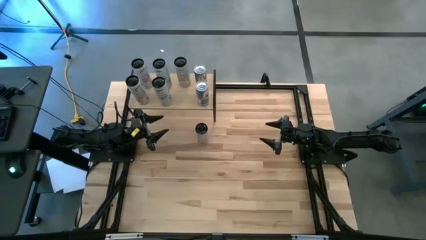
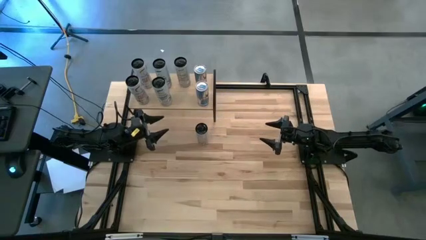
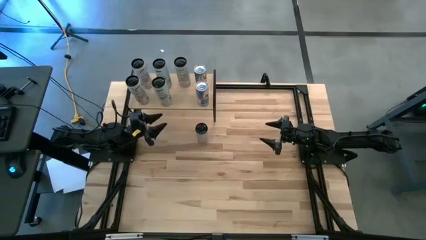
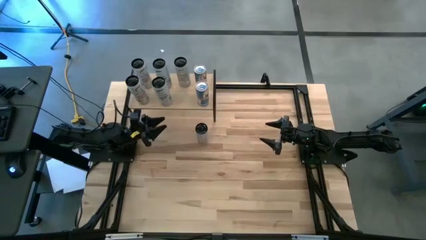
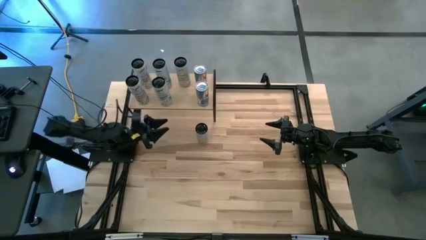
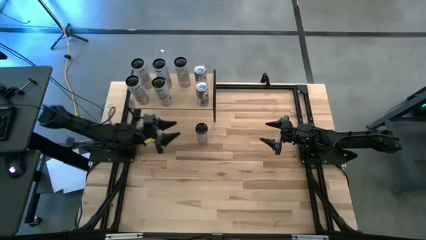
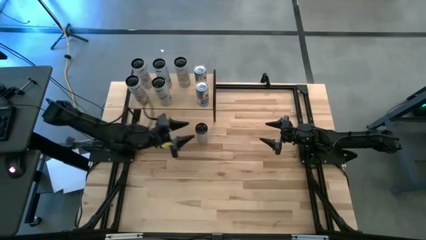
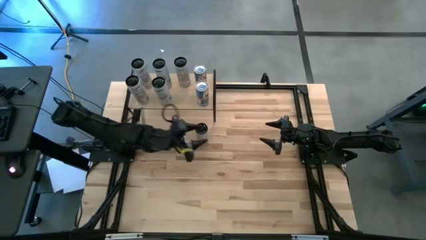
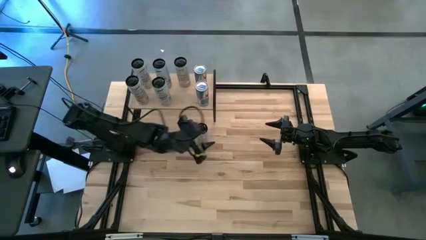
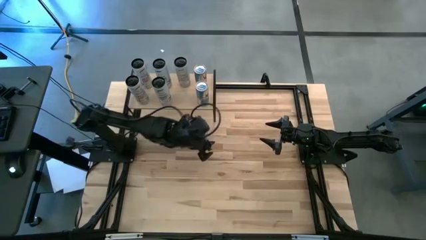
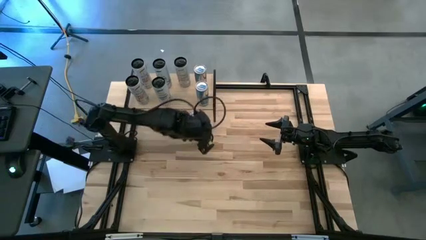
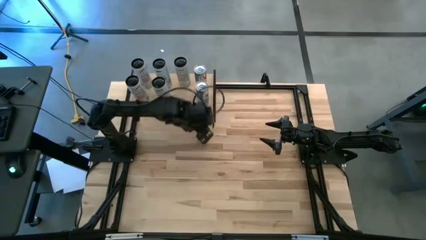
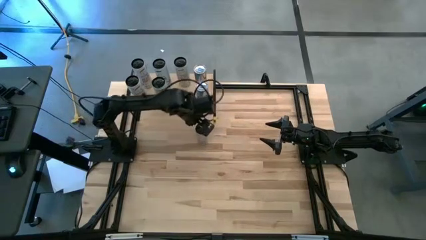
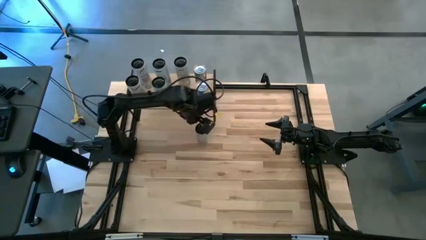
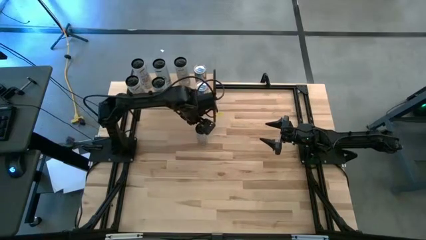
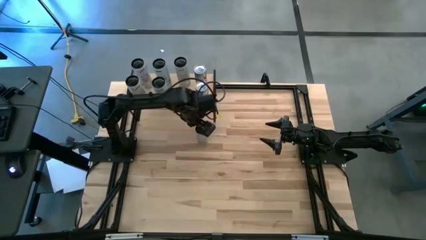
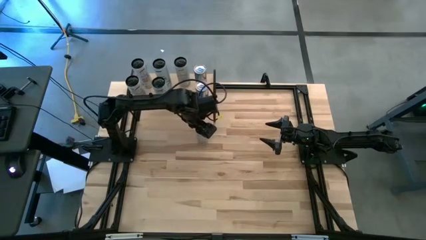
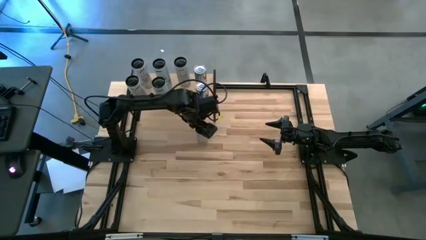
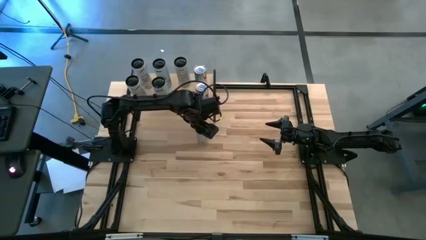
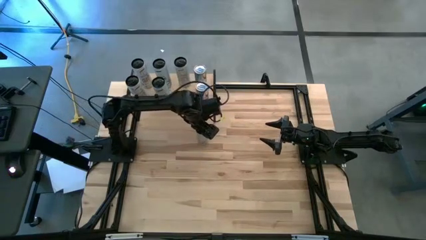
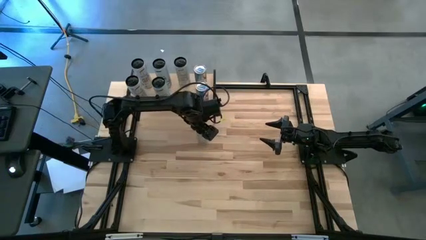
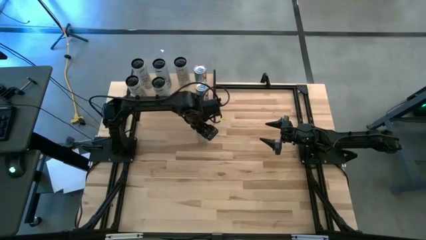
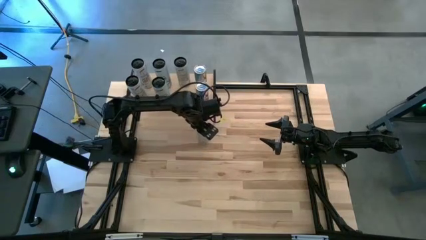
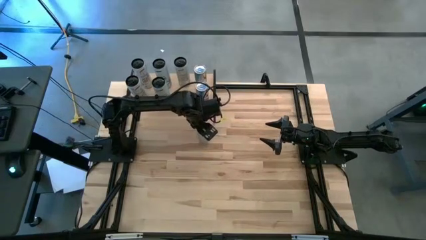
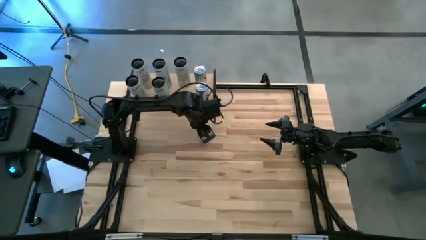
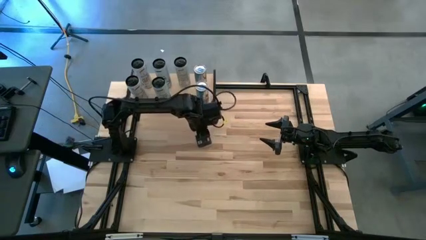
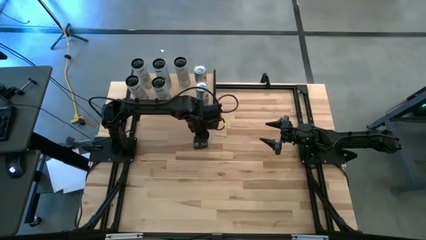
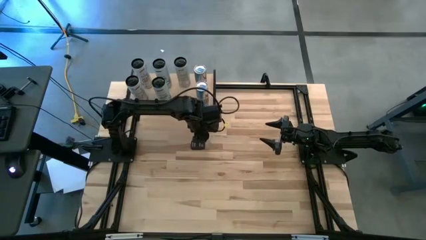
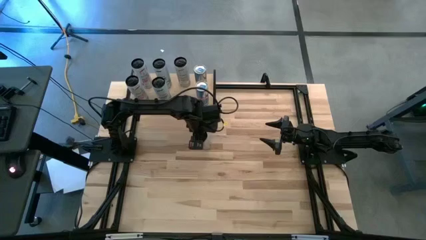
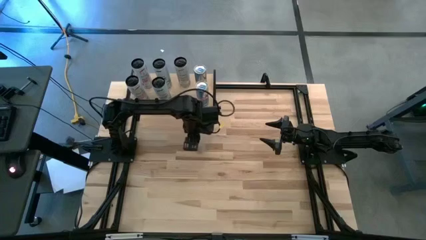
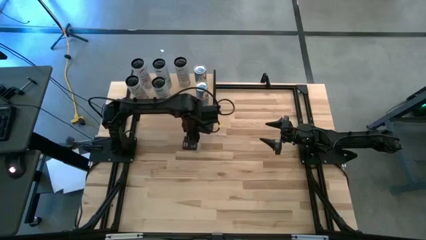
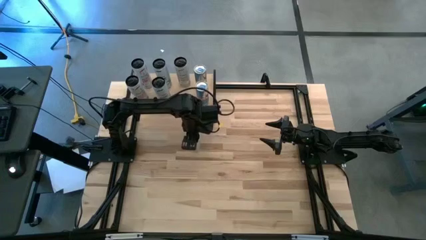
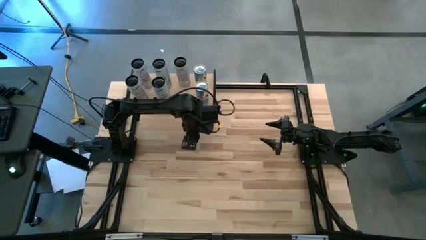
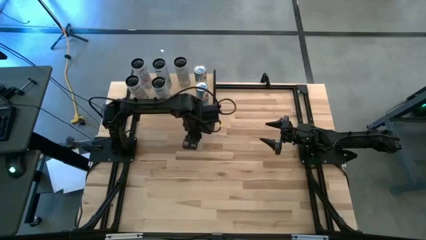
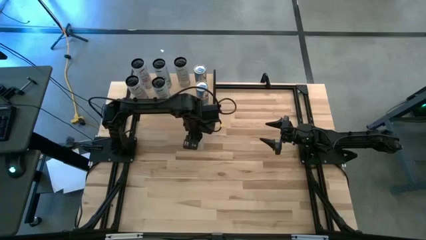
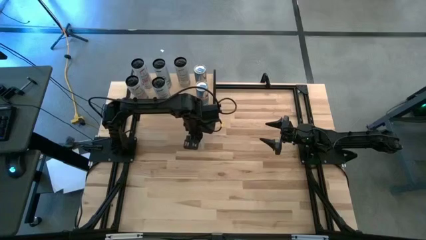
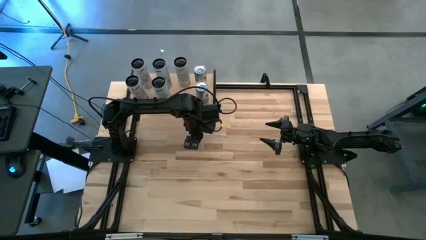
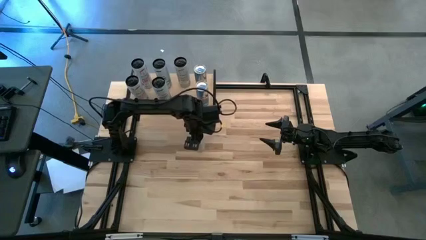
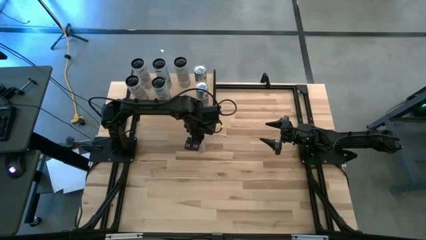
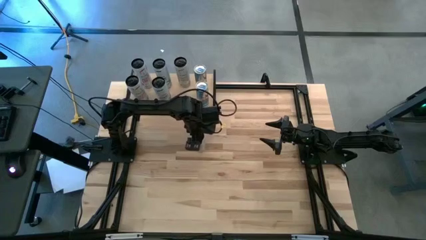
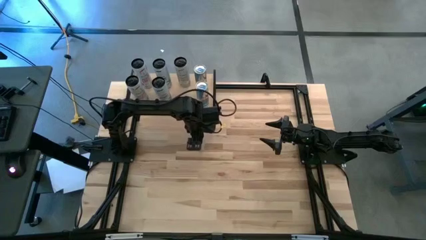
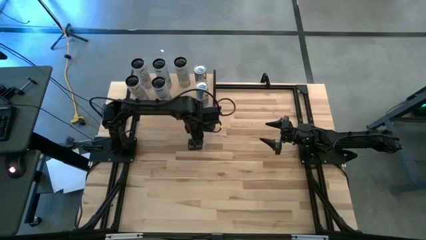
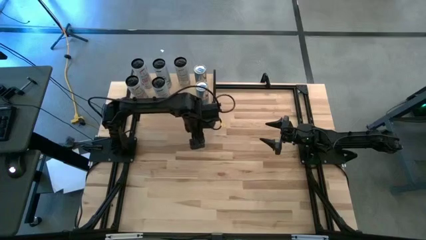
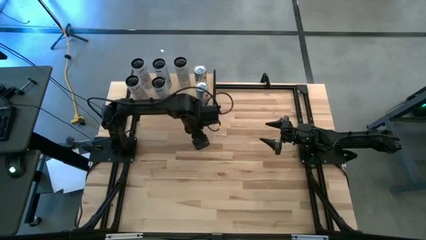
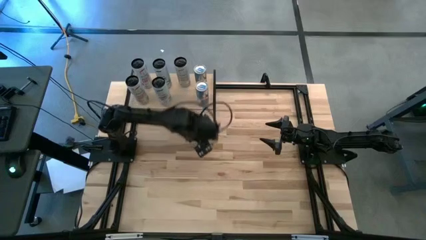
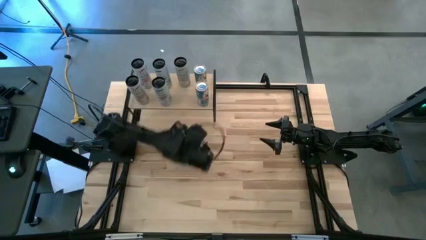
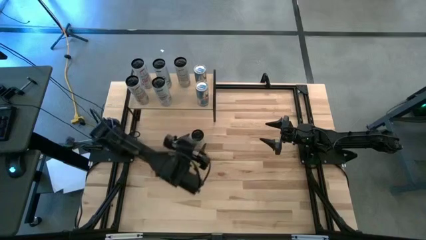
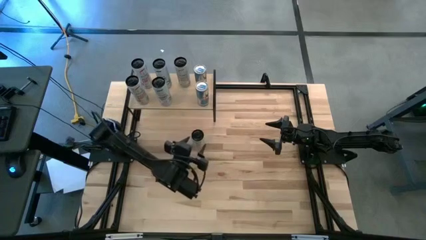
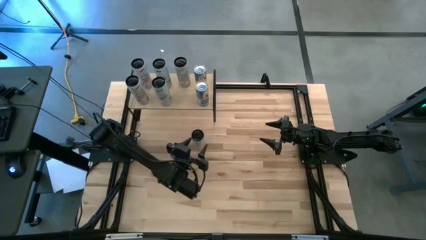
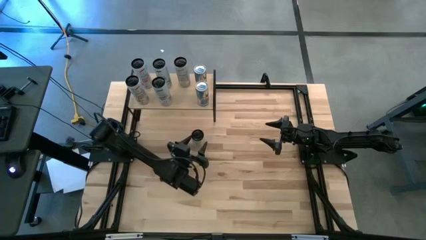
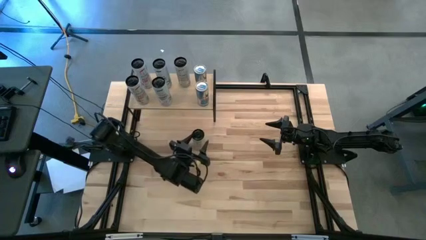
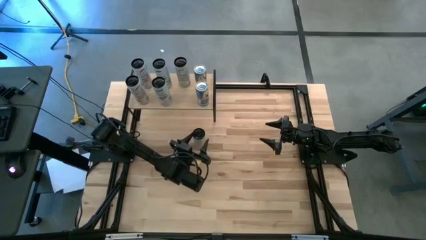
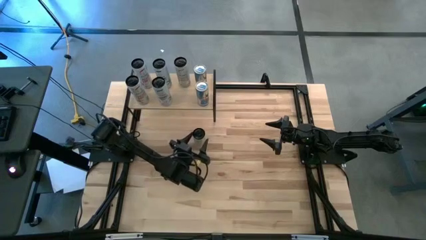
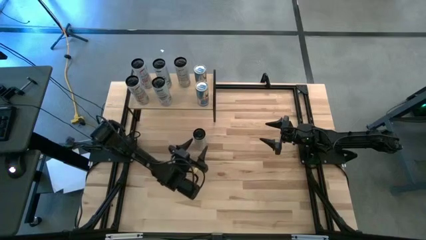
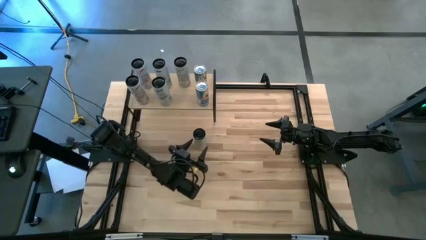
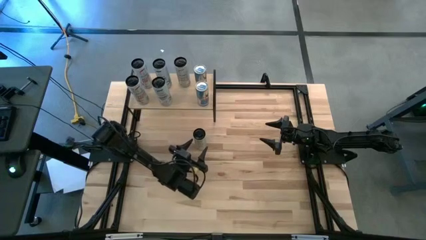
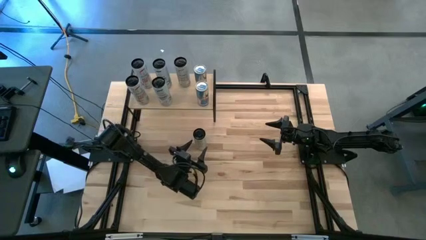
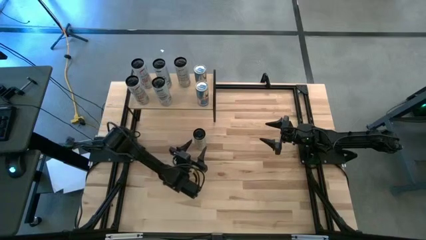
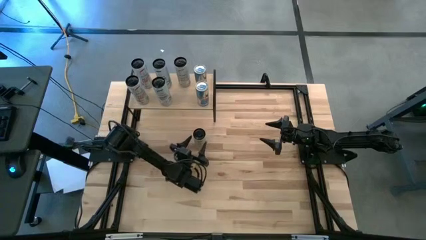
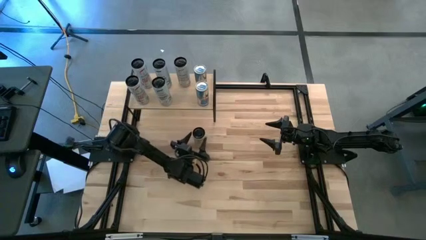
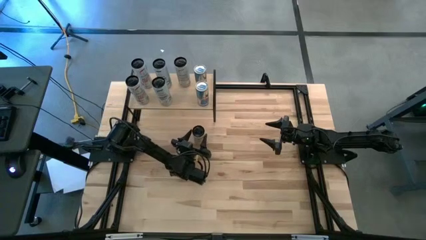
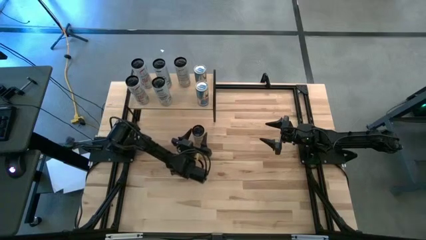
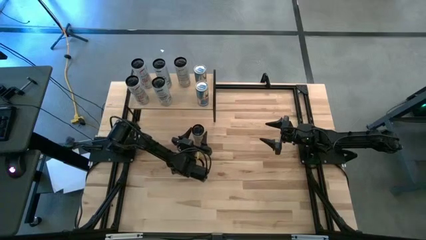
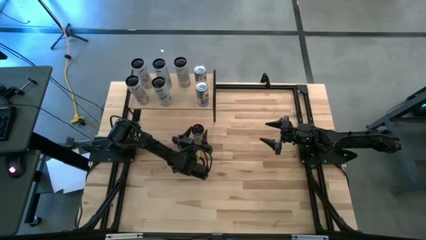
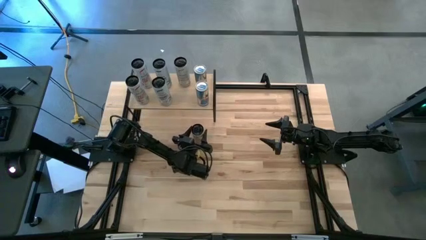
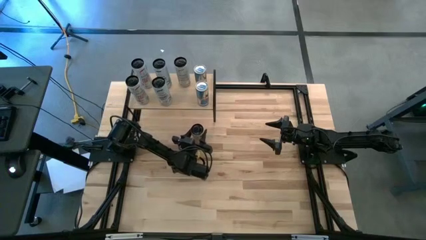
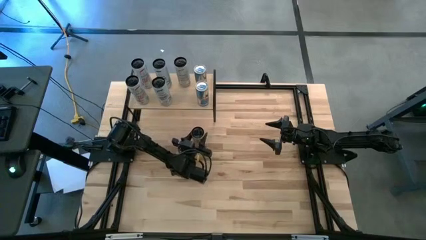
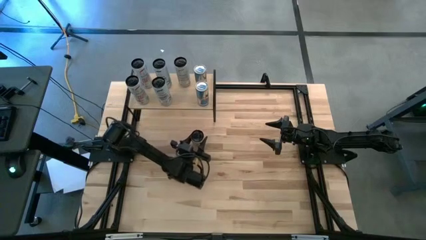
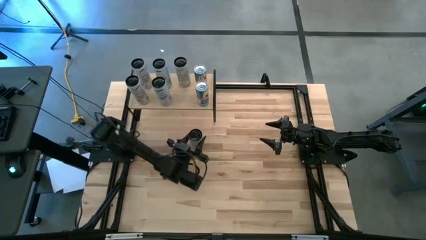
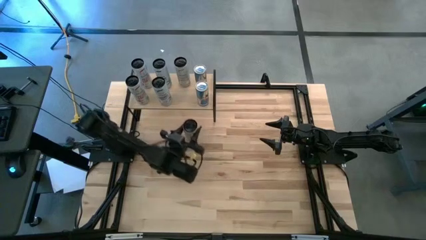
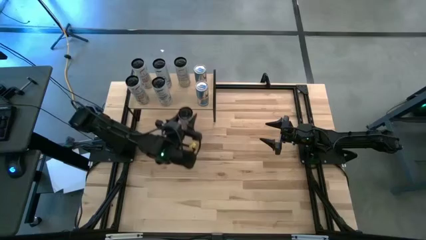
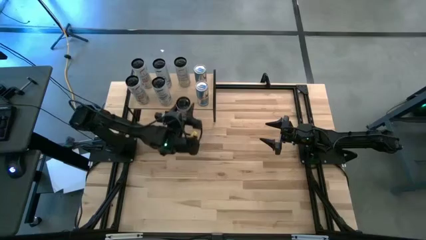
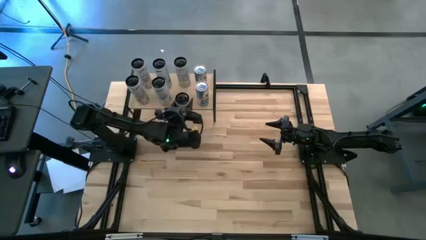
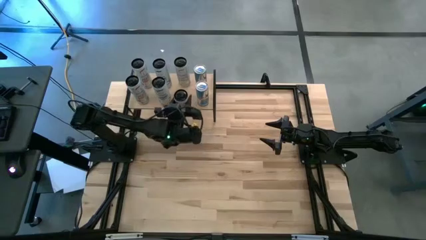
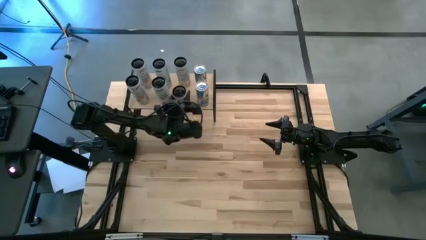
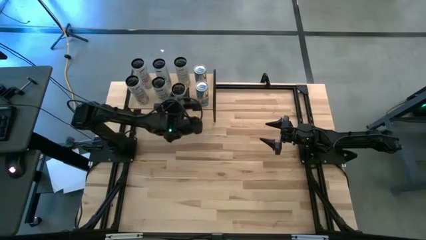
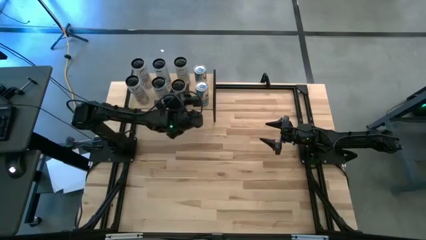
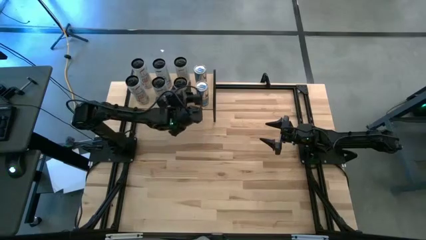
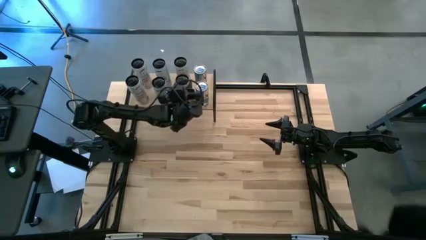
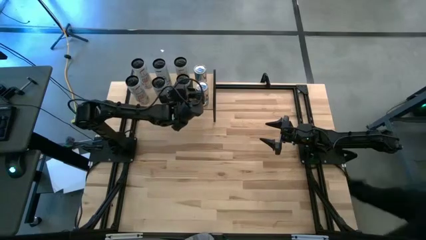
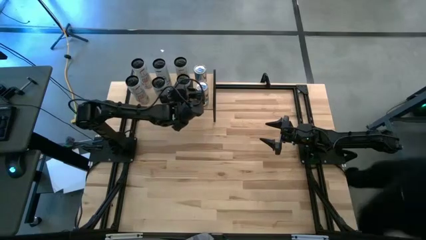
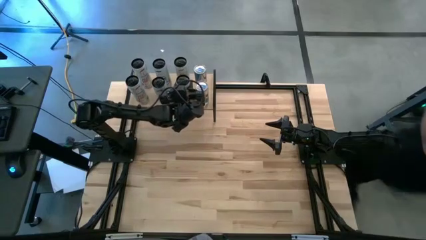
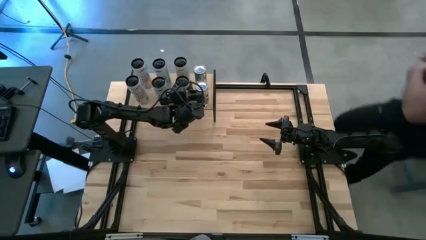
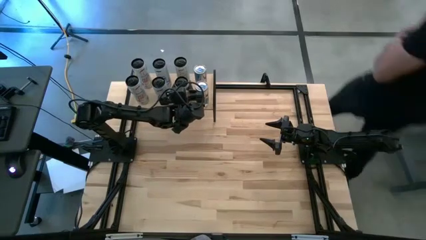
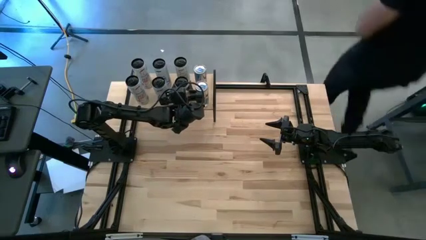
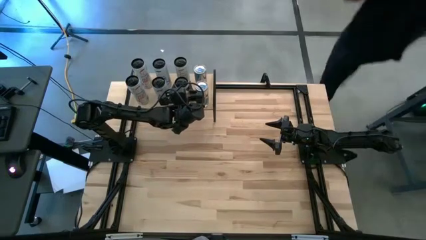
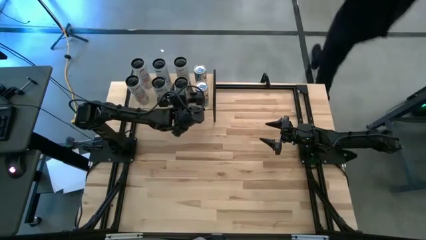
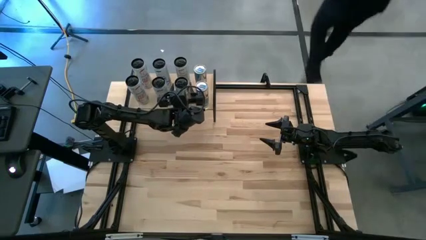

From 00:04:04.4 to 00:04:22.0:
Task: Place canned beverage on shelf
Put the white yellow soda can on the shelf aligned with the other white yellow soda can
